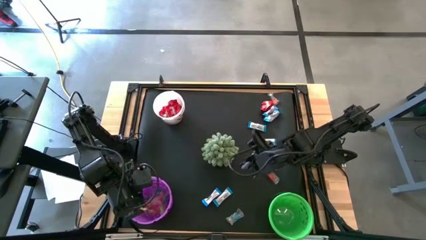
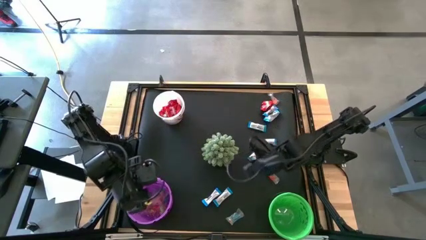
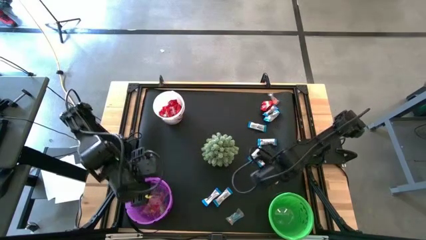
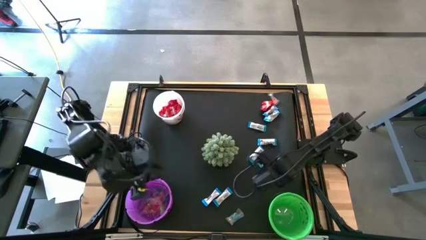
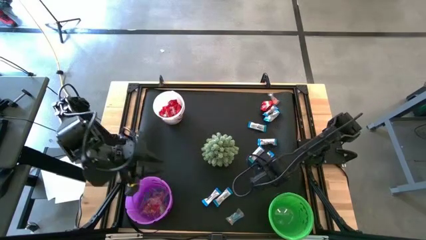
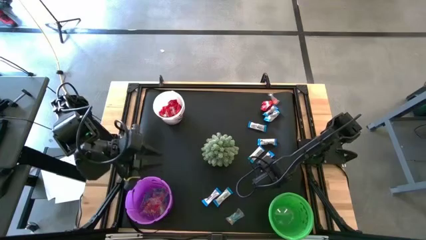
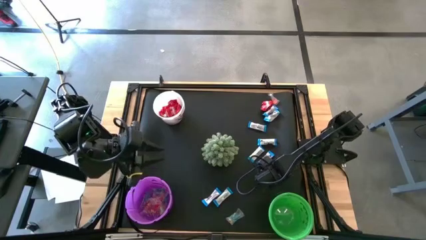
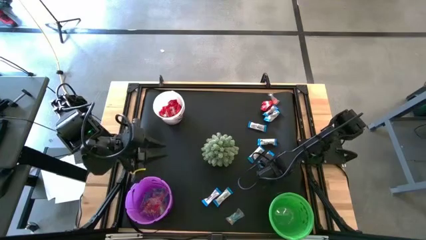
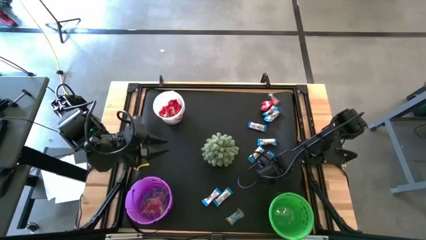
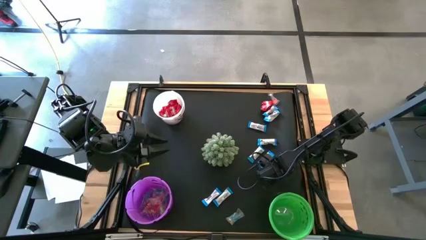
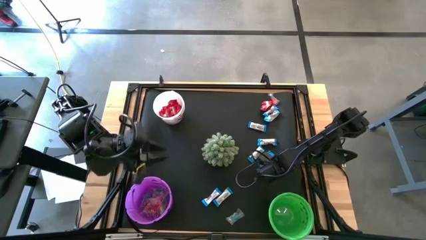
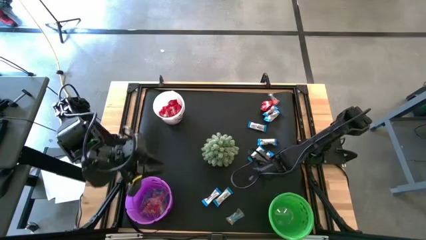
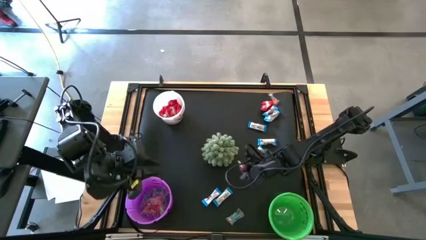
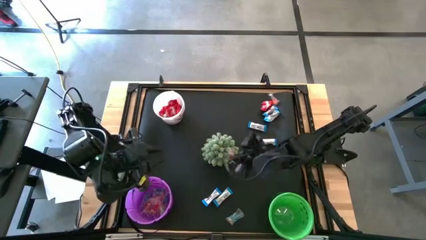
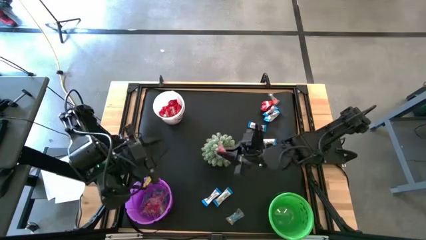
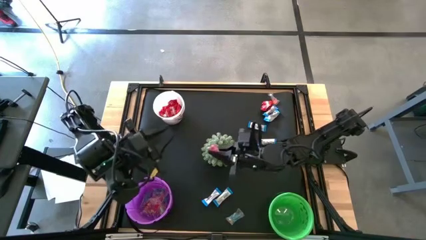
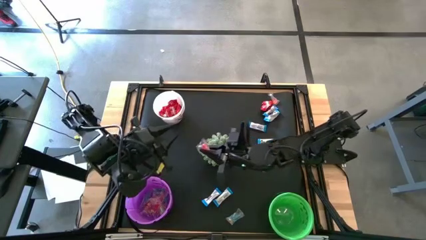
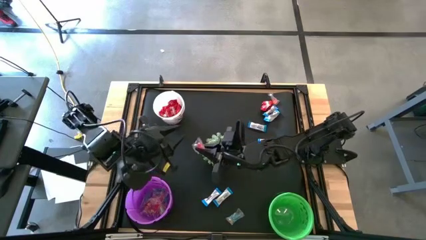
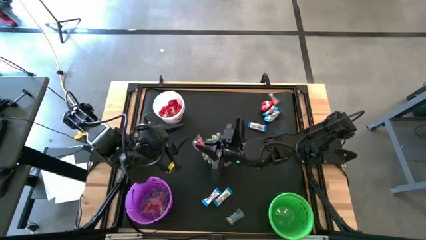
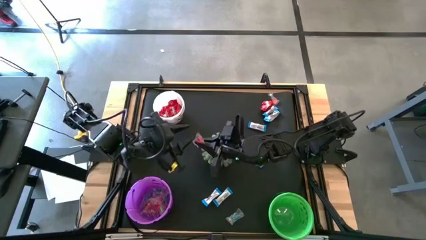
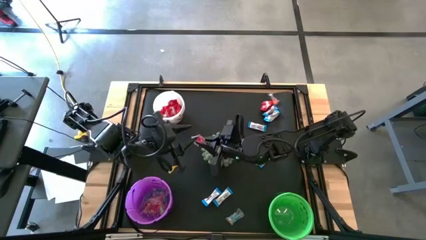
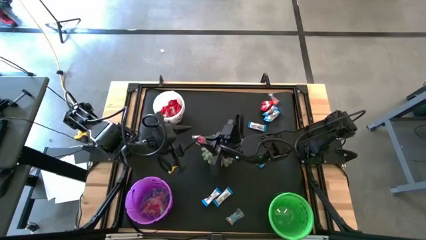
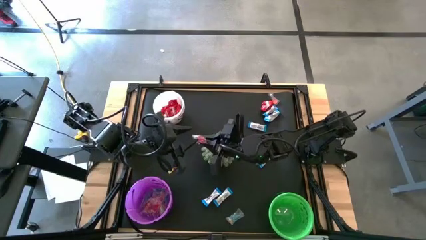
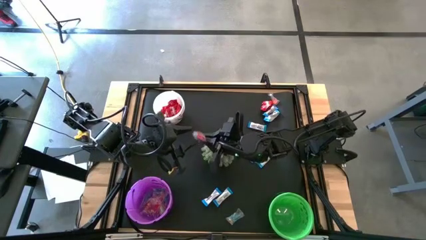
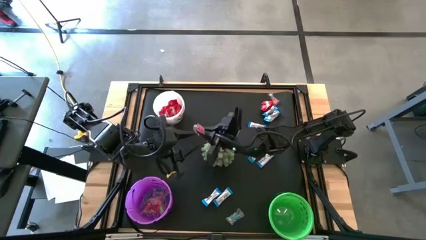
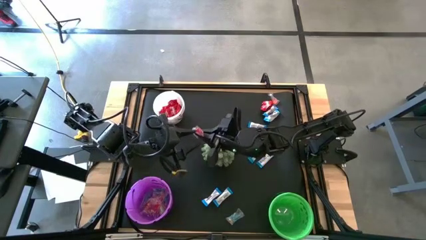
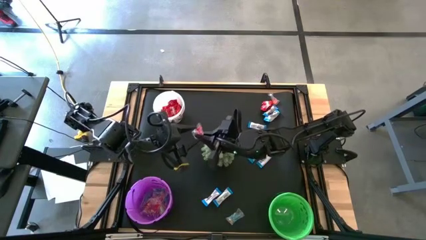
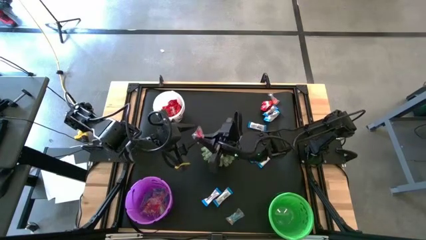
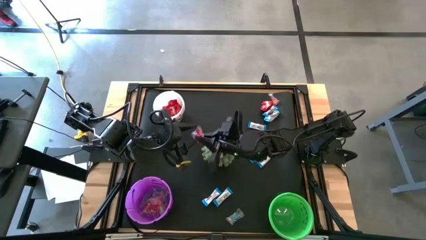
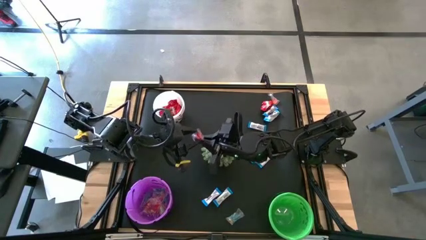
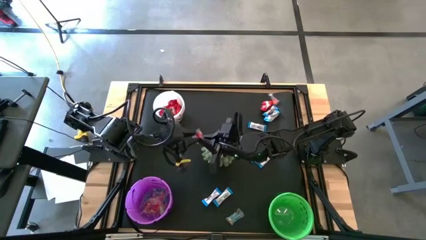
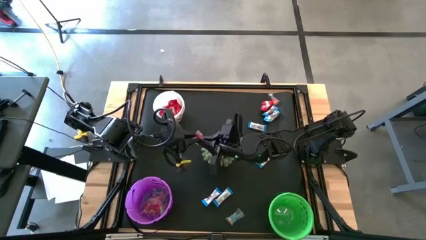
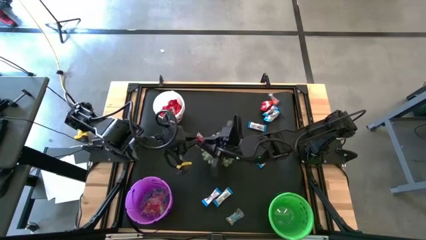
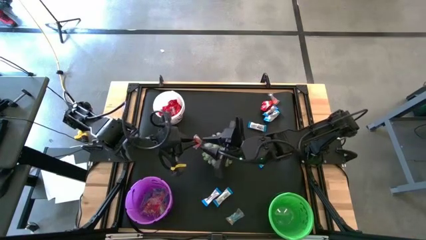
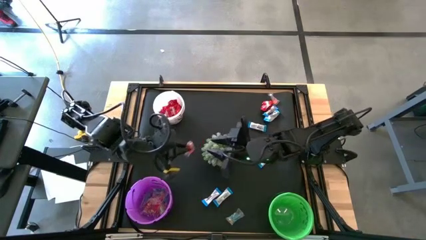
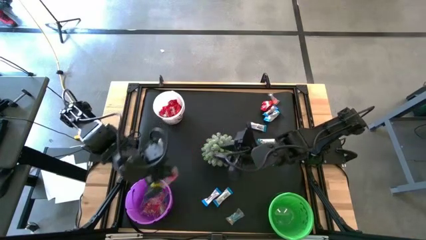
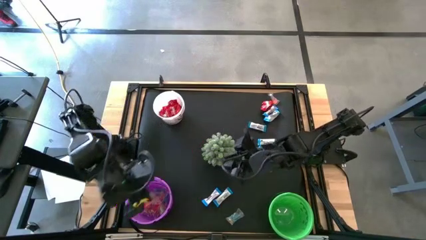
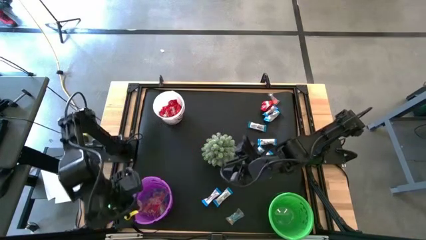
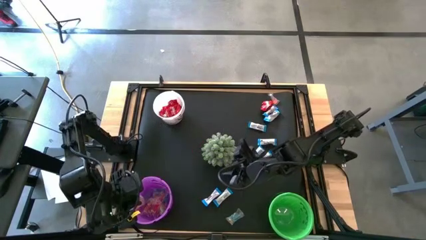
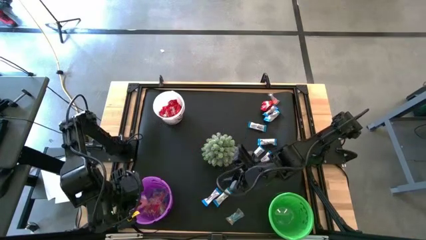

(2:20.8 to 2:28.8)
Task: Organize candy in baskets
Put the red gummy into the purple bucket

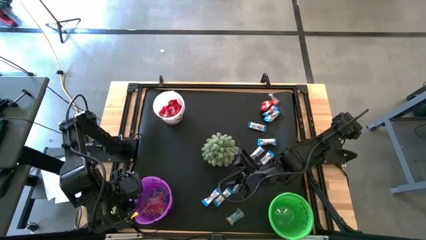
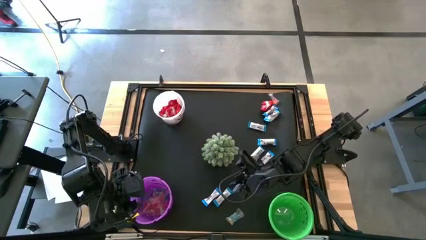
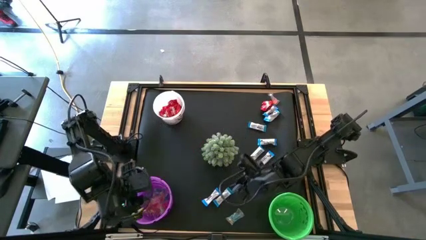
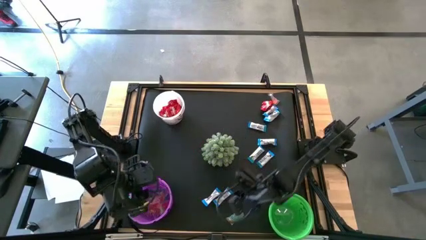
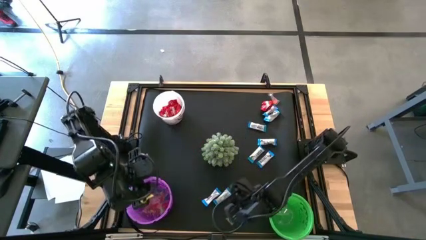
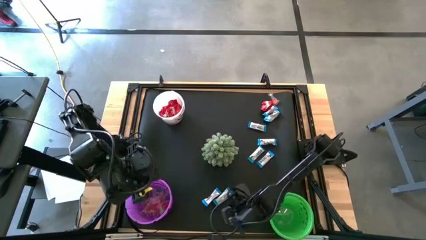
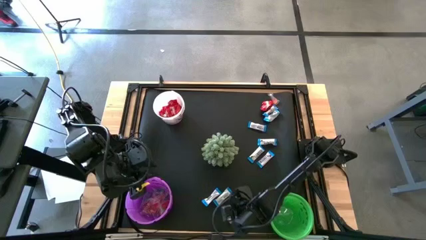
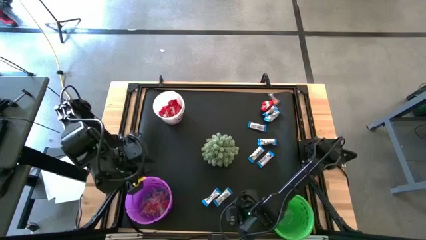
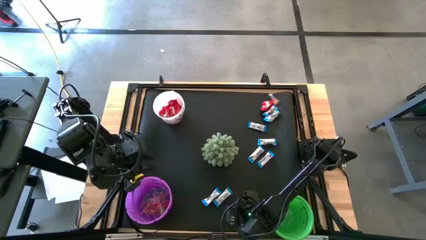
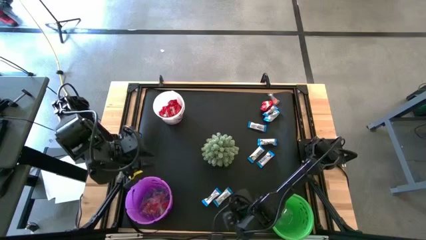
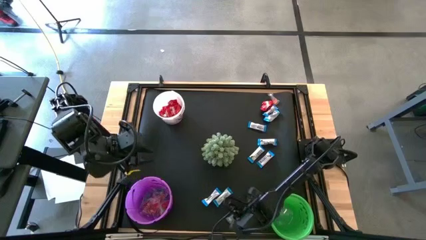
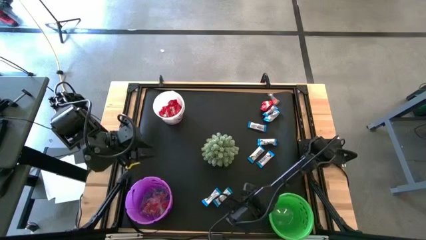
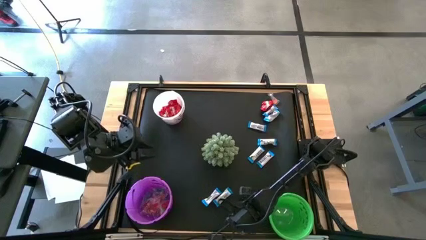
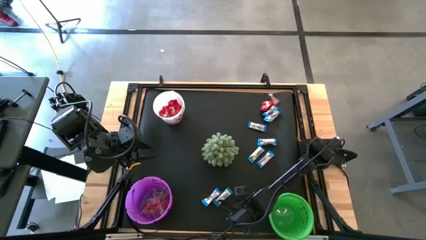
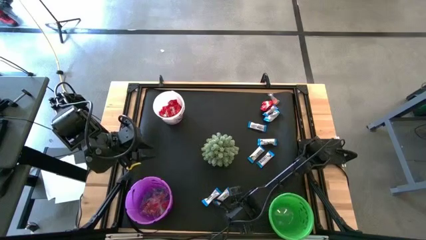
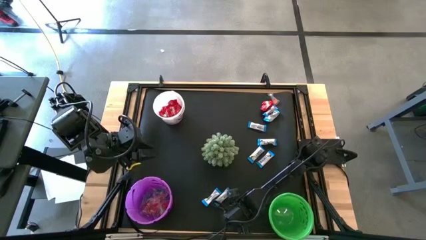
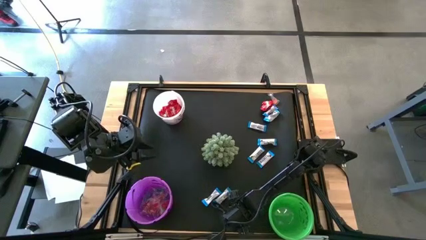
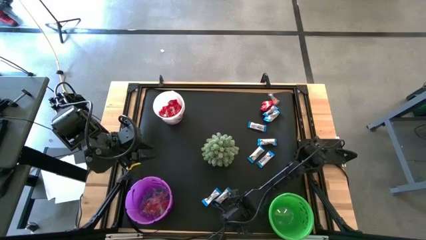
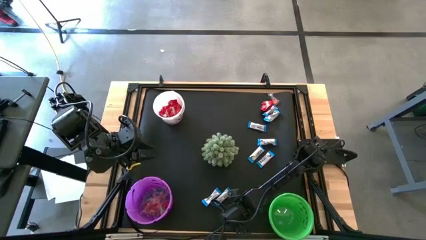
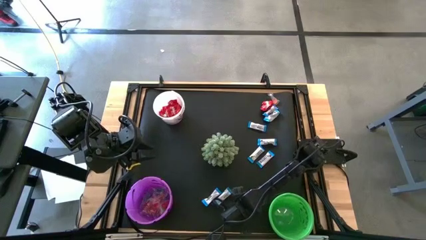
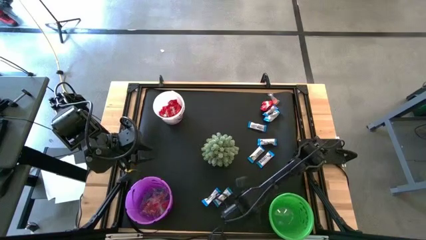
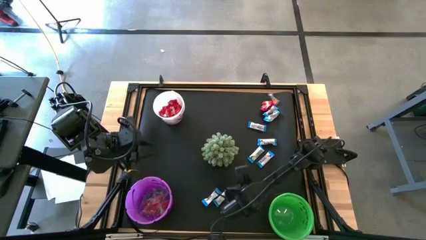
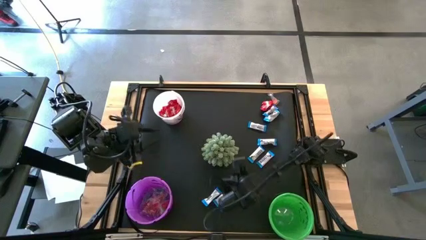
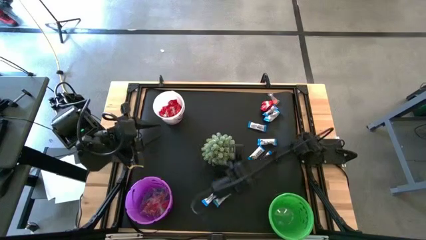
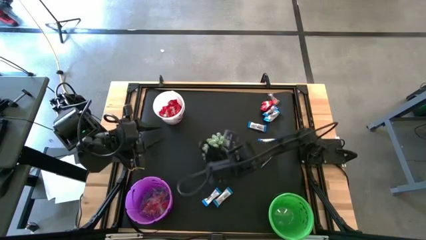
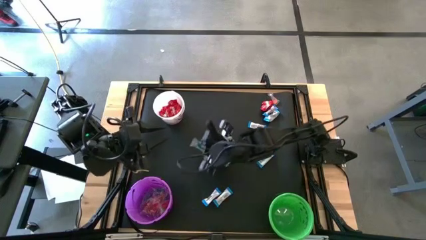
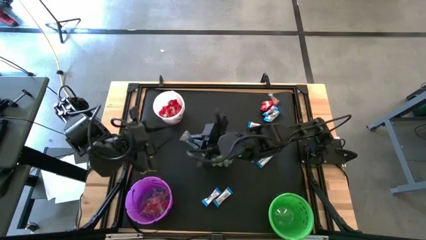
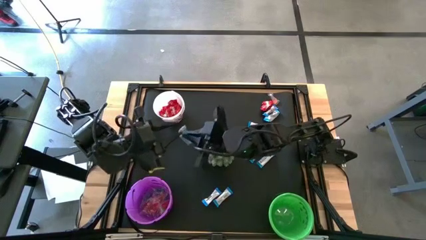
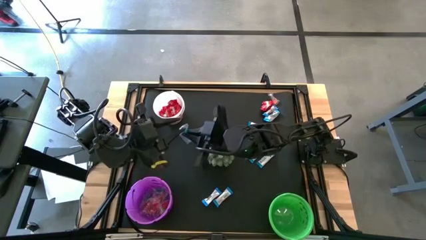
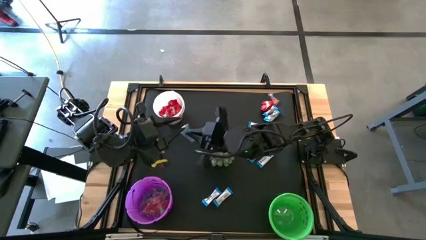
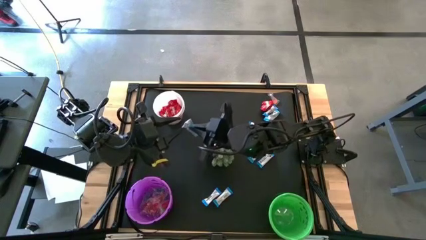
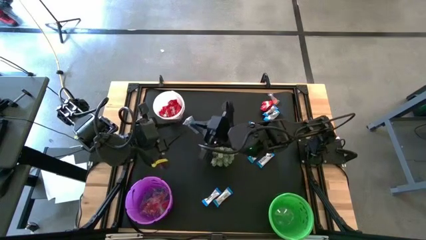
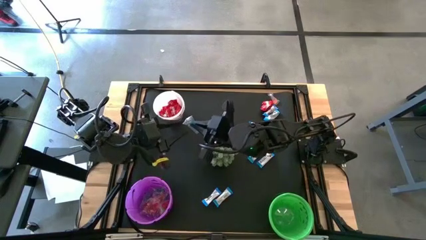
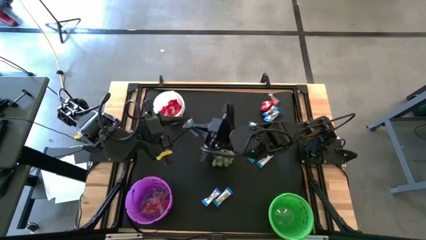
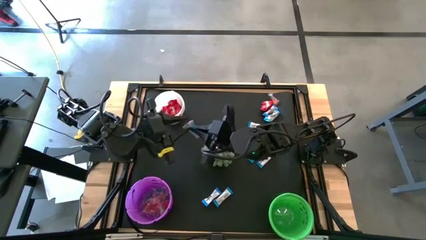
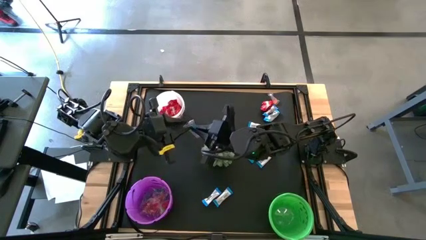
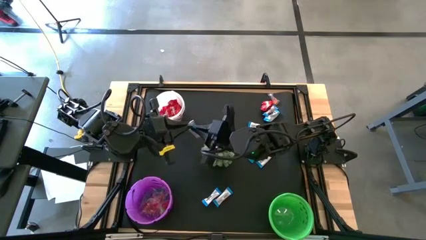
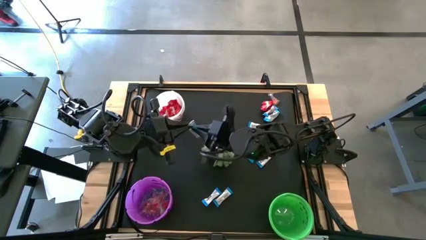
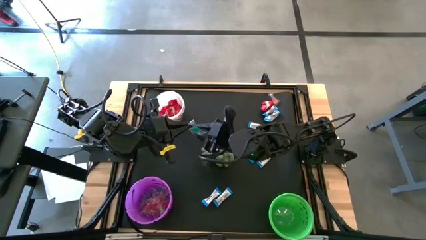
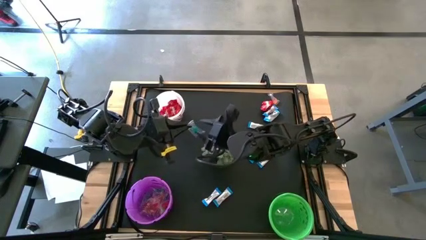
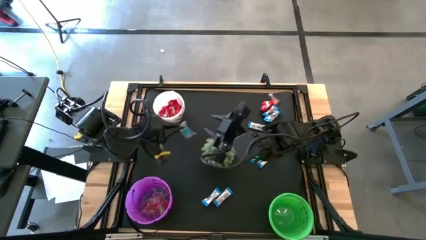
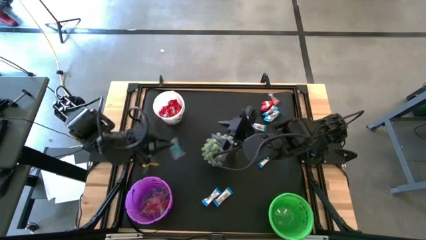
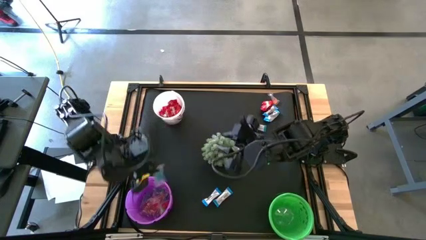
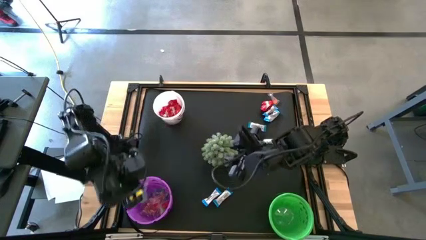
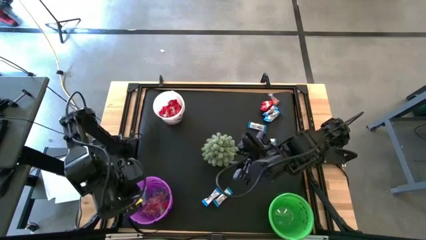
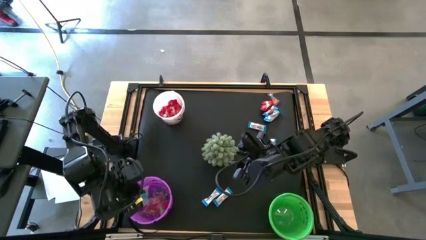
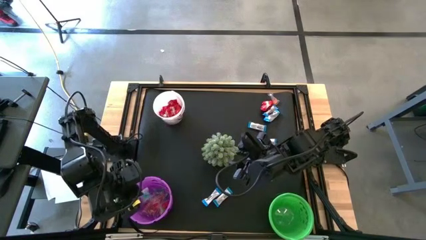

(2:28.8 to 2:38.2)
Put the blue gummy into the purple bucket
